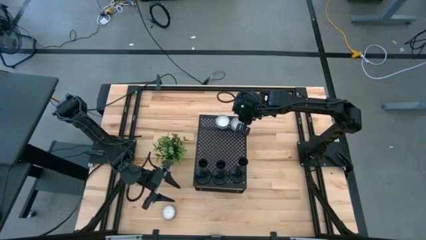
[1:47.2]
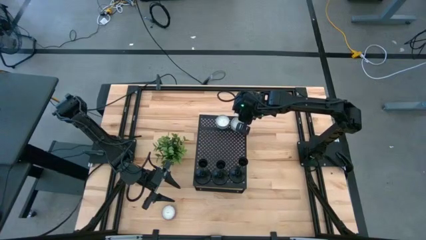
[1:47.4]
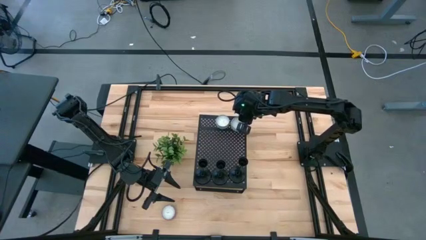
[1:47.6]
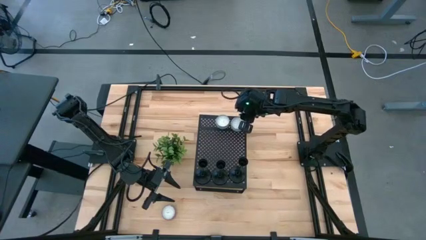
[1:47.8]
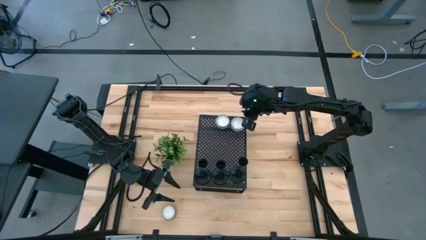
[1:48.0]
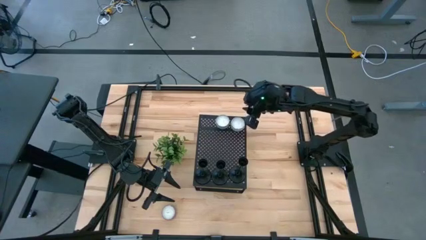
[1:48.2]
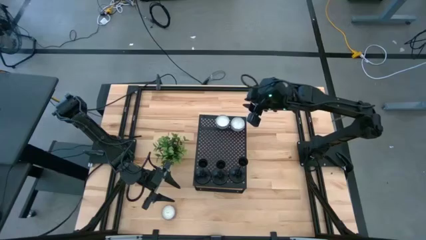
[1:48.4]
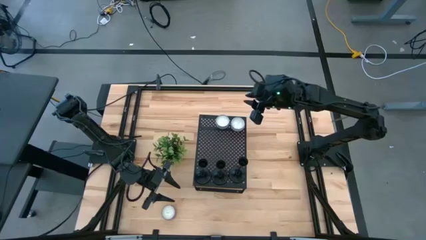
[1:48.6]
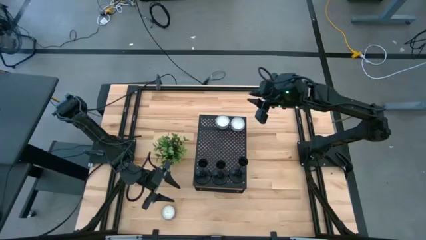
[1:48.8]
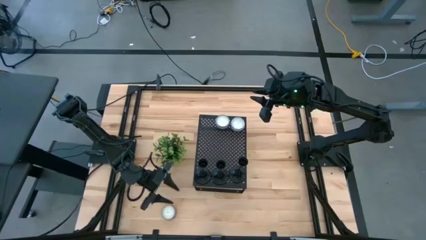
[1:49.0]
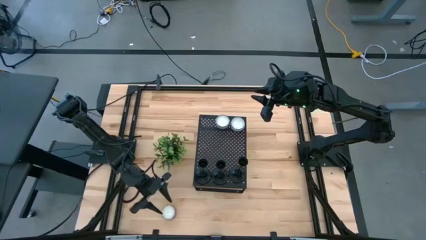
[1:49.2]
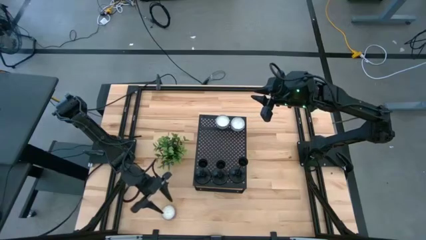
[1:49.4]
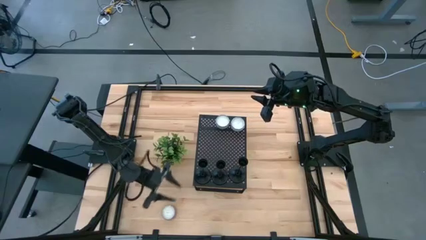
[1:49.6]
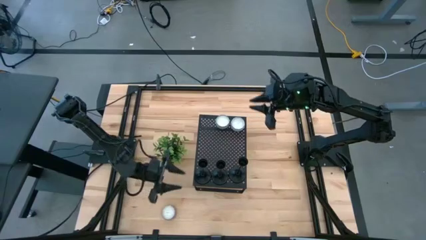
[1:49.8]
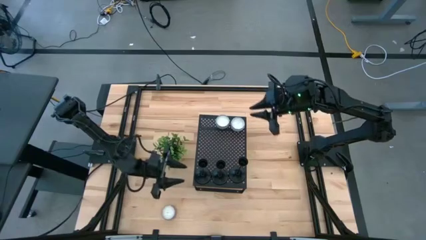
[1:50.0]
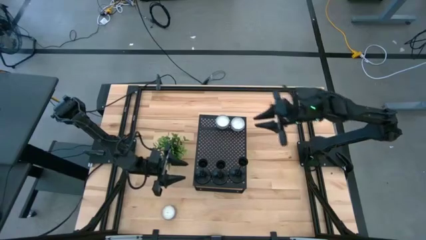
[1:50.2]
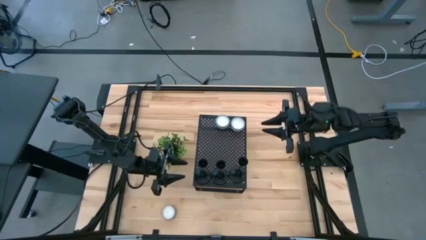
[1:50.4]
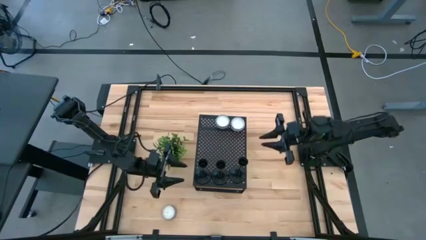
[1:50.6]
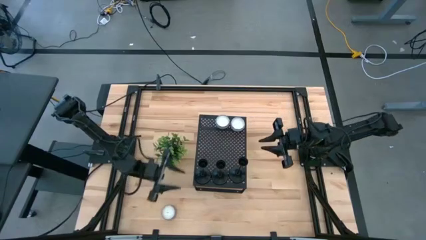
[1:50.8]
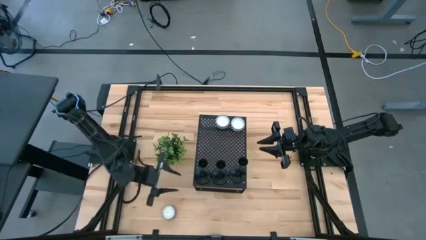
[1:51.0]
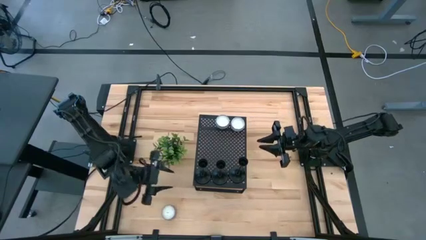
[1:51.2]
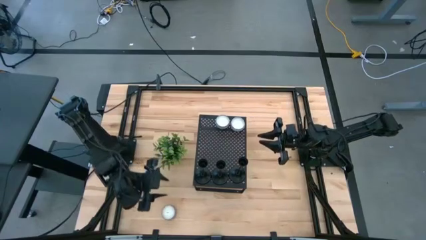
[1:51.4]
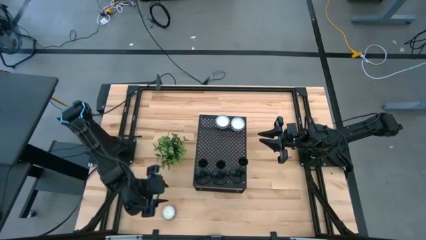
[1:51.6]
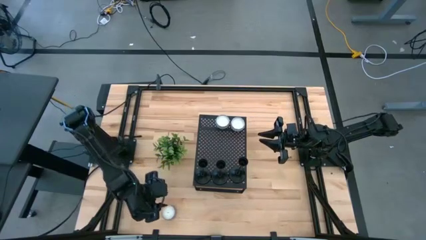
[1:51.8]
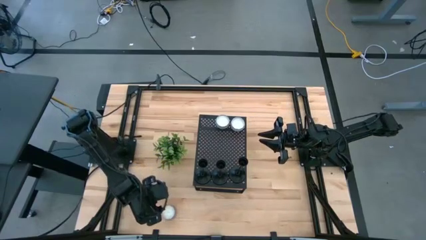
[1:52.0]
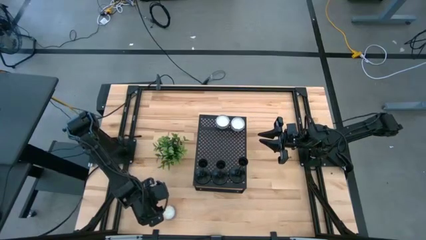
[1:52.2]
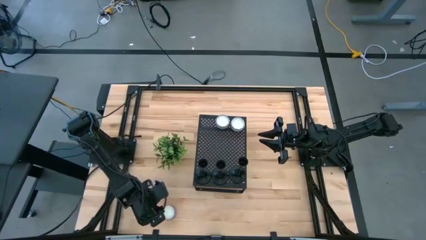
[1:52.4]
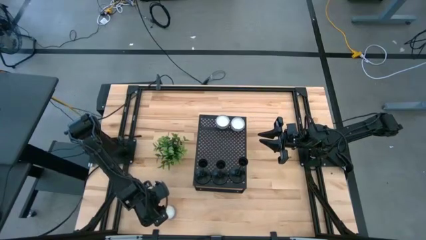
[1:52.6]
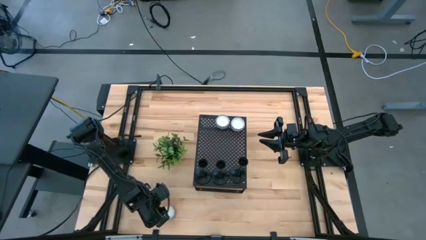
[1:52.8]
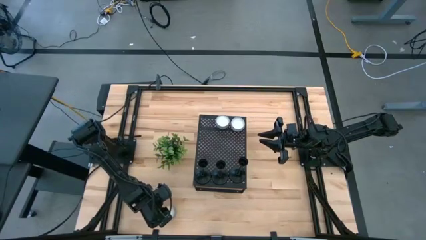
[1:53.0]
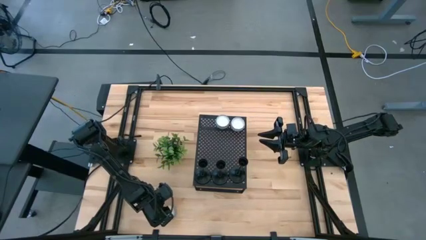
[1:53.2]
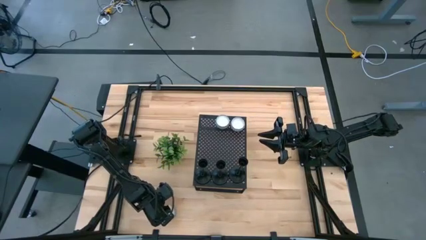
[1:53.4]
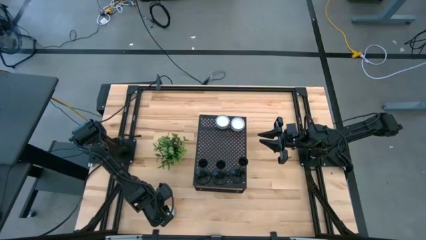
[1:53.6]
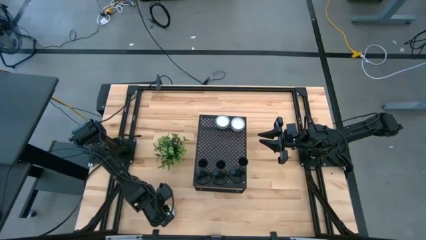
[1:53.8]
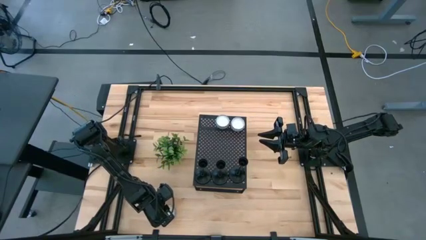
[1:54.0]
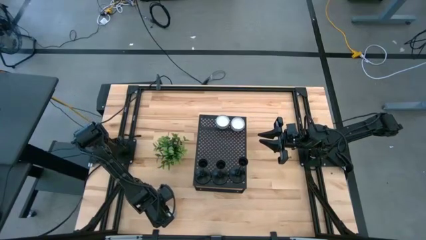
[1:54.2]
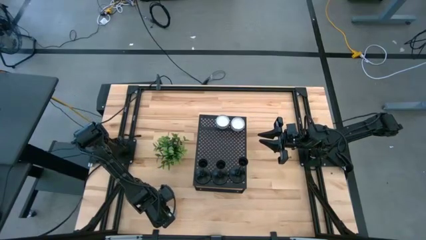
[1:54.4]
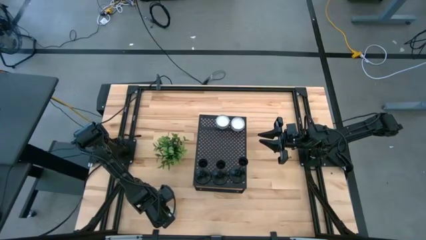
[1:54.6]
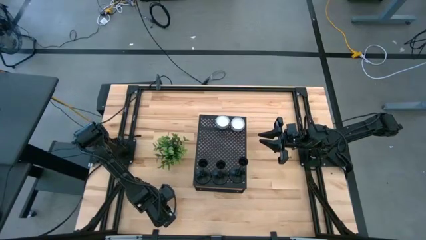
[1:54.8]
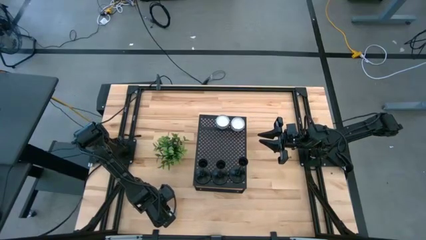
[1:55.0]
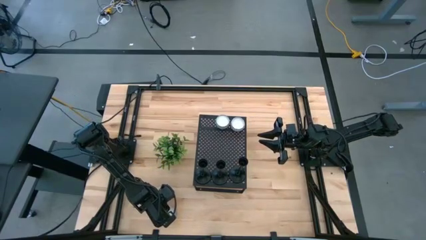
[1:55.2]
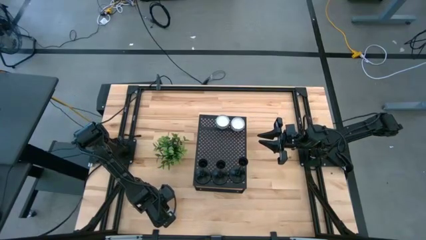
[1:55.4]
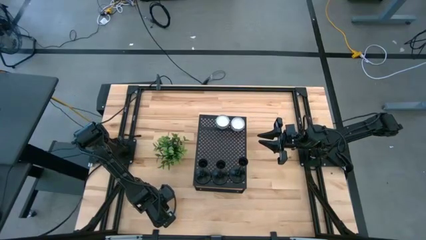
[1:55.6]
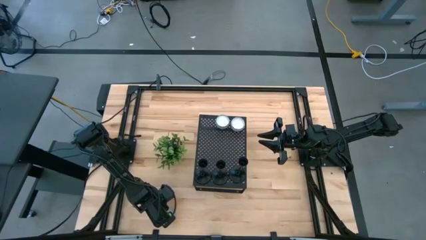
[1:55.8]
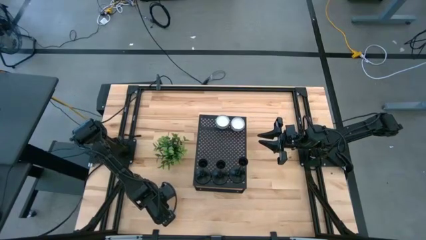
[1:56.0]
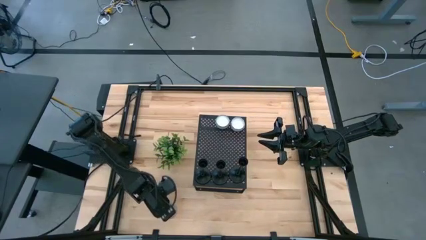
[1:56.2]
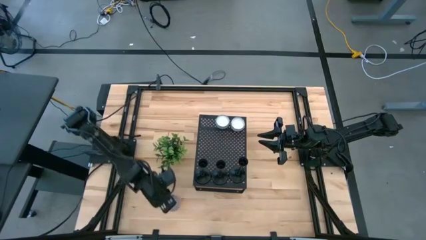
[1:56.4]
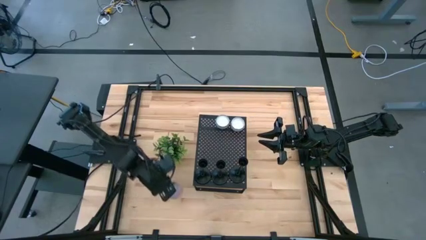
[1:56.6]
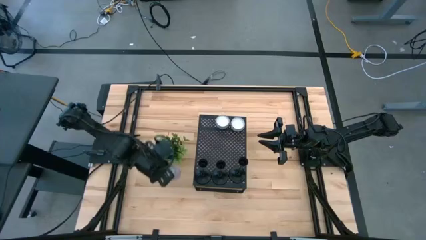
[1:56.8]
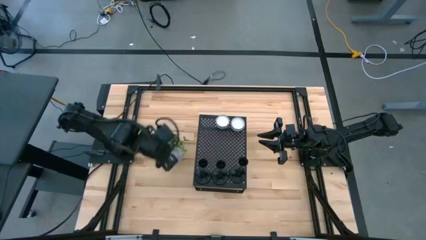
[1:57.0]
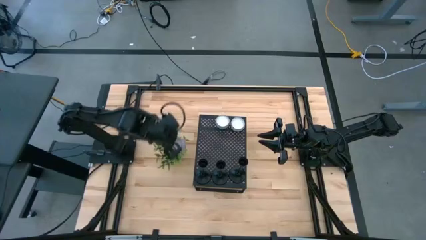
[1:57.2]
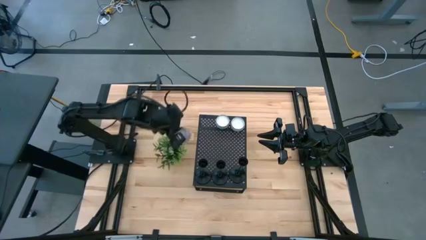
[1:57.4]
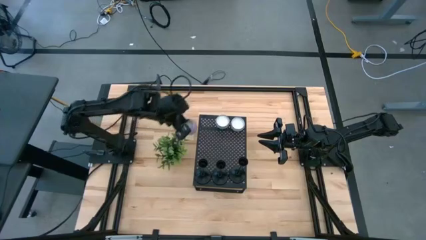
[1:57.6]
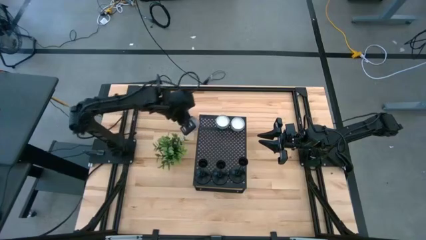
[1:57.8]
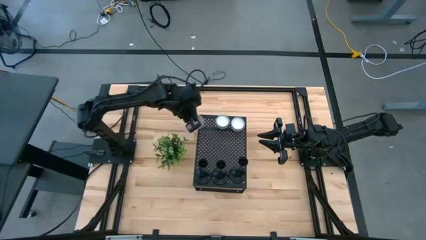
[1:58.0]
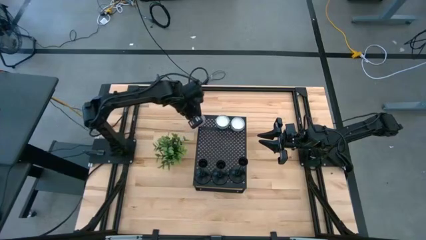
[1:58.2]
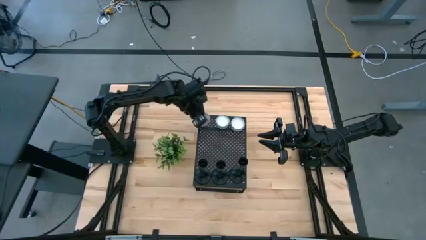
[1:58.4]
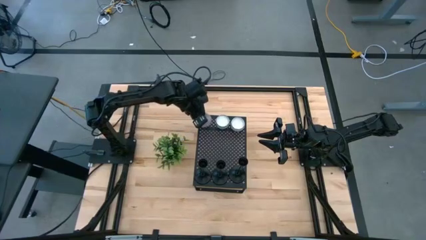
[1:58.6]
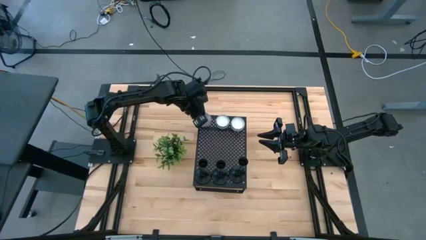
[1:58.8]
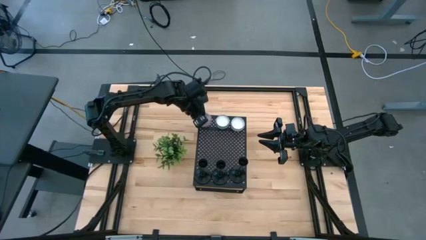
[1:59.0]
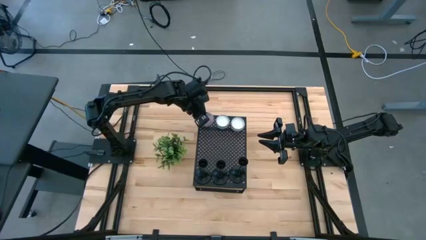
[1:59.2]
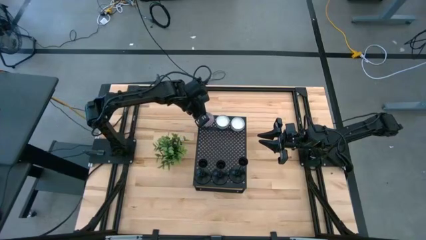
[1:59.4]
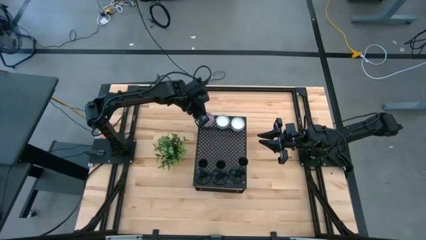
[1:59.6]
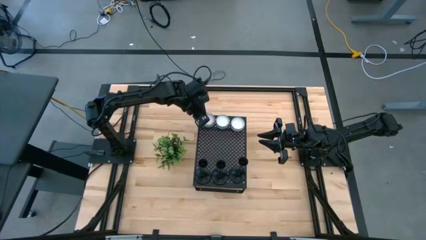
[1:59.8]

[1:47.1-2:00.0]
Task: Pick & Place candle stick holders
Put the orange patterned candle on the shelf

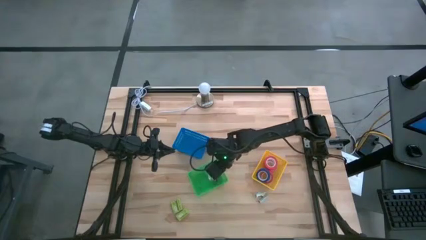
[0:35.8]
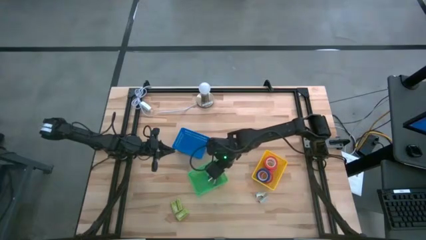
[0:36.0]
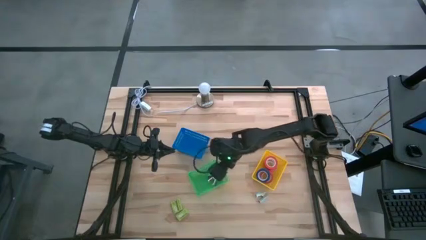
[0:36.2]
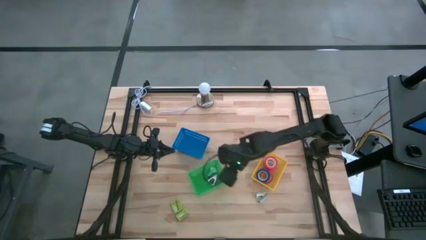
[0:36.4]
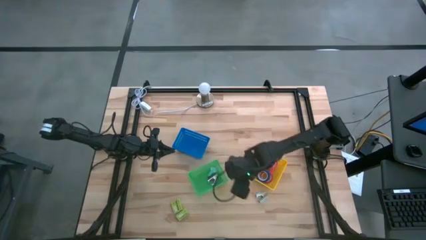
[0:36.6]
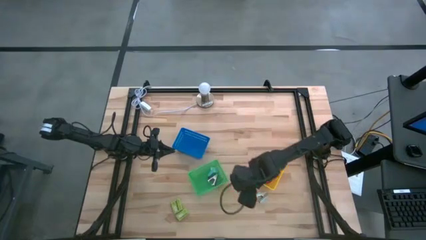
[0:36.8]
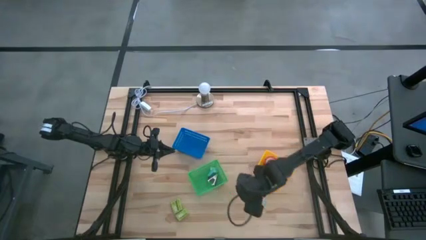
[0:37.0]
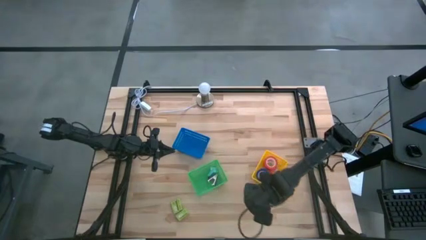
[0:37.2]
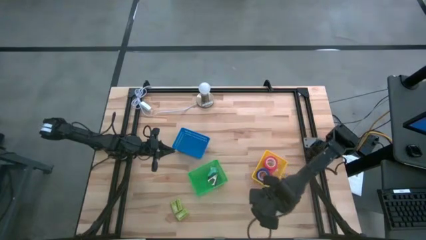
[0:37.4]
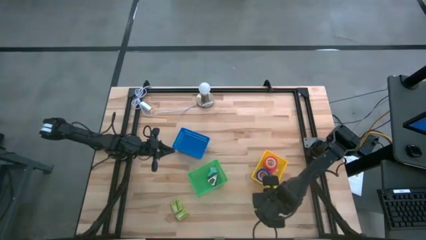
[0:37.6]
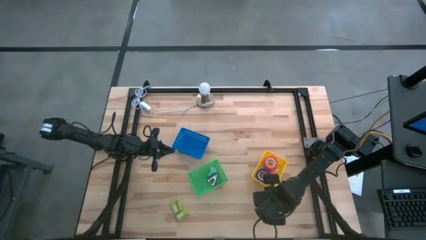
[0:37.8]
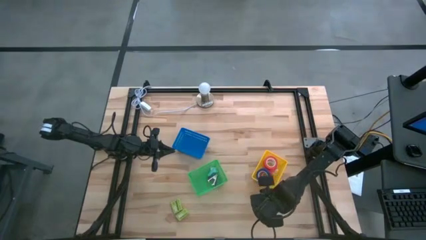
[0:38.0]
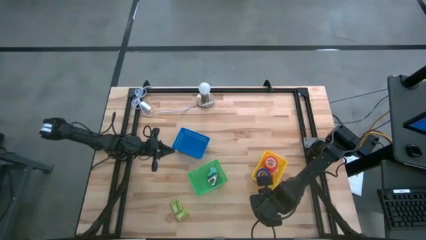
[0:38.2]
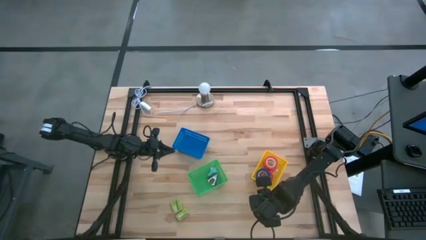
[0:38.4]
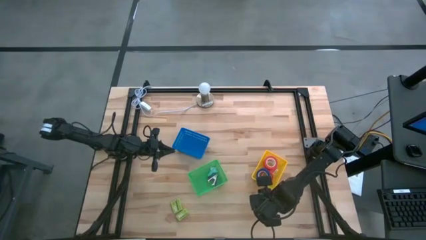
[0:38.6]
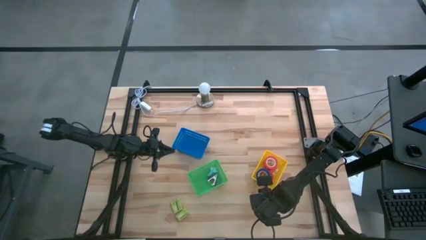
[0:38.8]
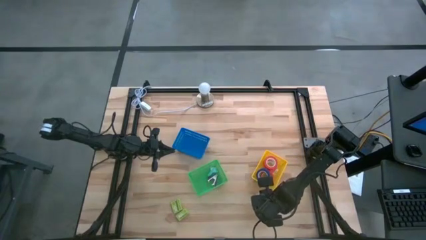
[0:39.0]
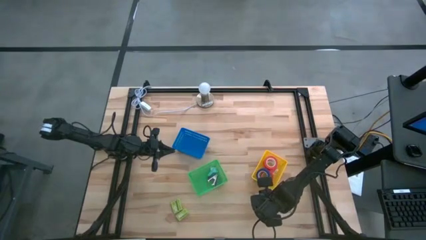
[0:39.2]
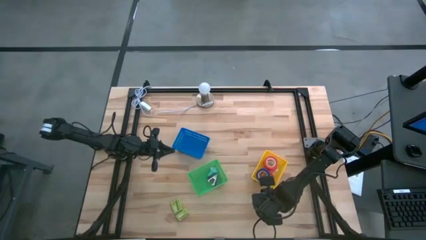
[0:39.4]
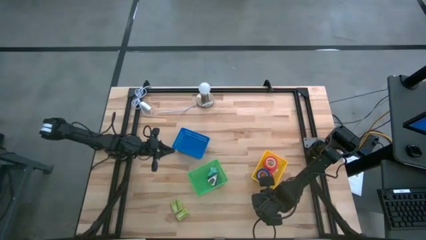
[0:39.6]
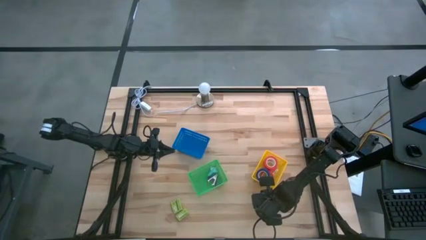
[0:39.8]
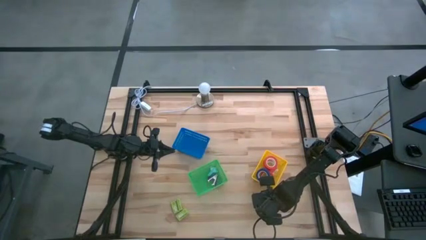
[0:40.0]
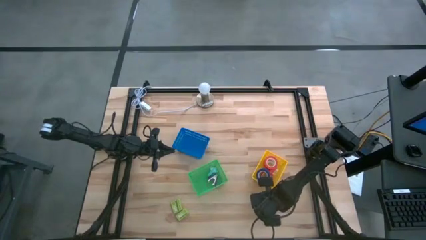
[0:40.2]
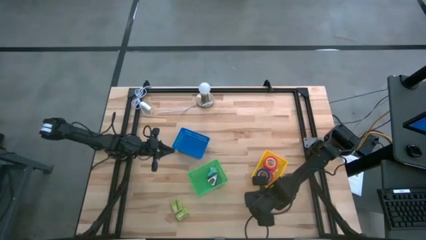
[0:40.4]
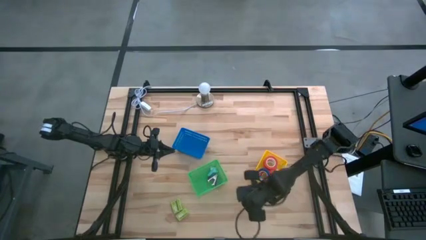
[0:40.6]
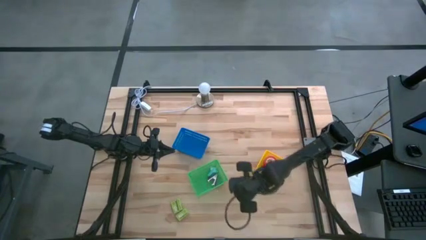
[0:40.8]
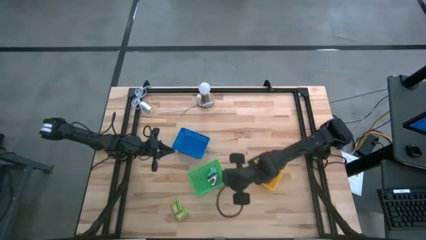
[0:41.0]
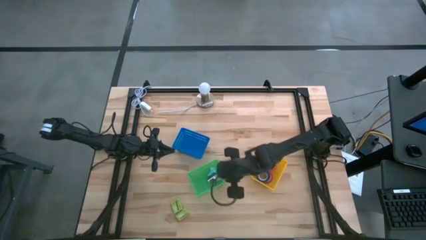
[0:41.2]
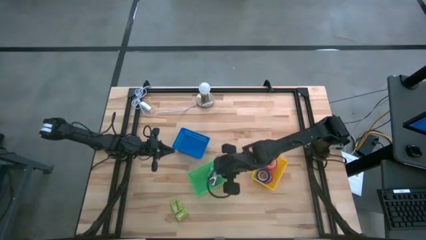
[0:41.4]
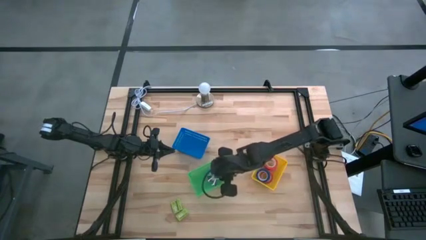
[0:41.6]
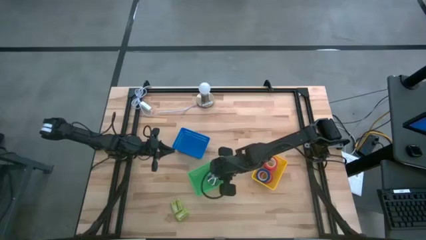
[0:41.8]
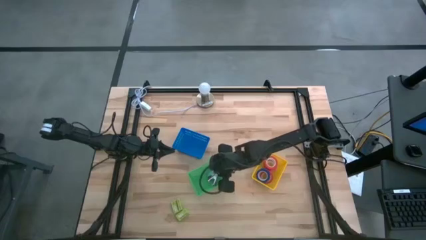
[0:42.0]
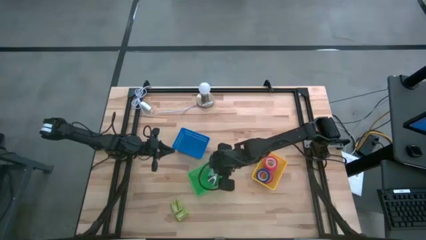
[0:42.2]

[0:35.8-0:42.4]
Task: Pick and place Stapler, Stapler remover, tape
Put the blue staple remover into the green bin
